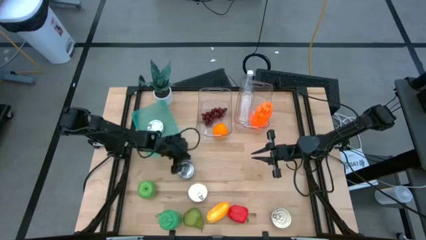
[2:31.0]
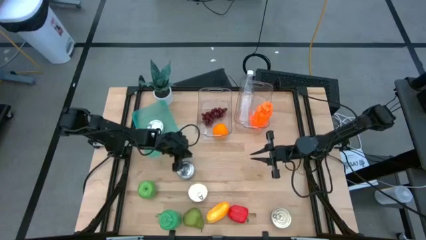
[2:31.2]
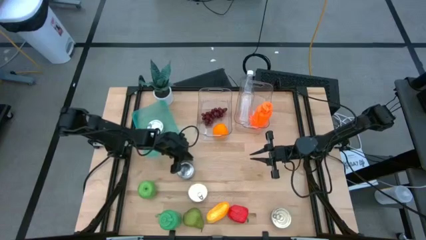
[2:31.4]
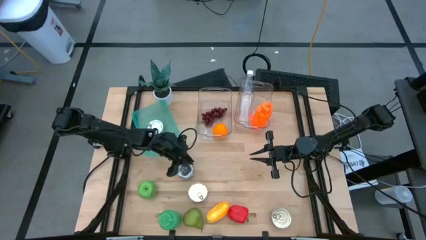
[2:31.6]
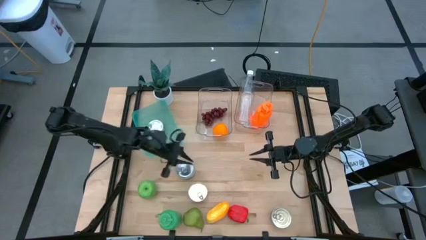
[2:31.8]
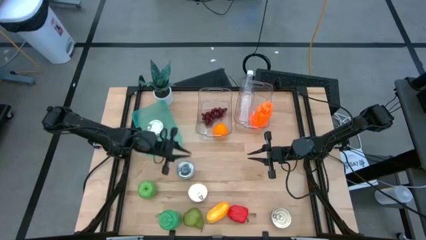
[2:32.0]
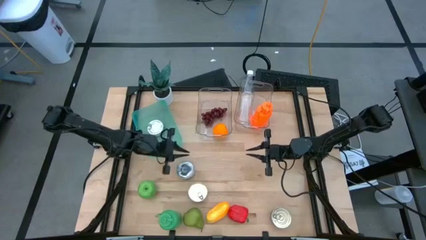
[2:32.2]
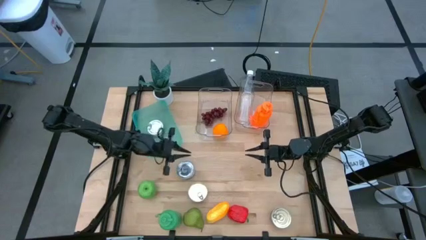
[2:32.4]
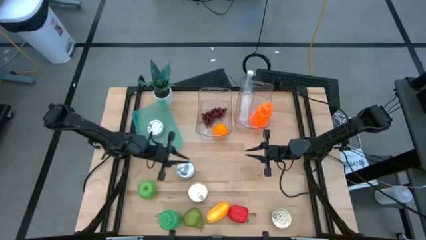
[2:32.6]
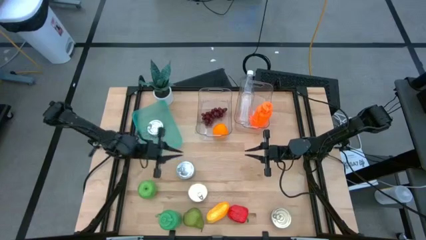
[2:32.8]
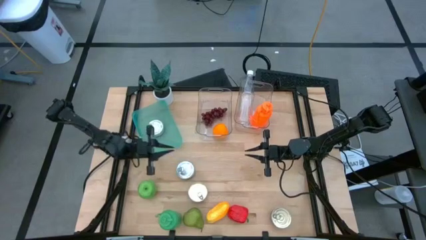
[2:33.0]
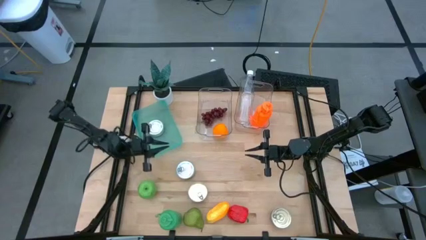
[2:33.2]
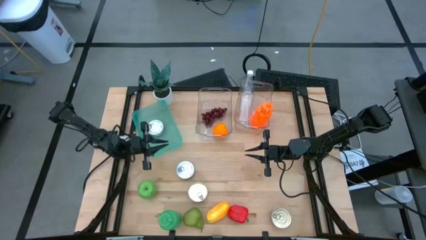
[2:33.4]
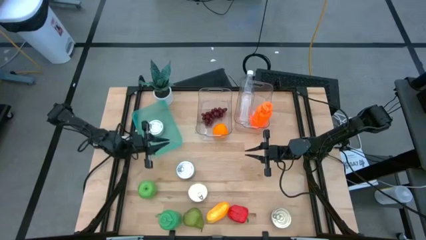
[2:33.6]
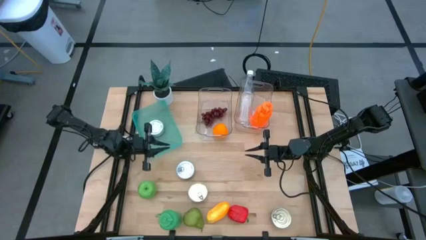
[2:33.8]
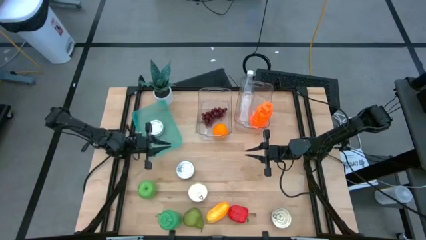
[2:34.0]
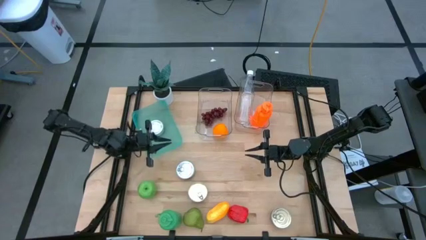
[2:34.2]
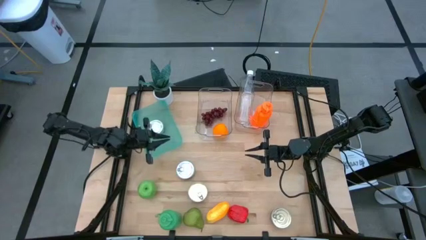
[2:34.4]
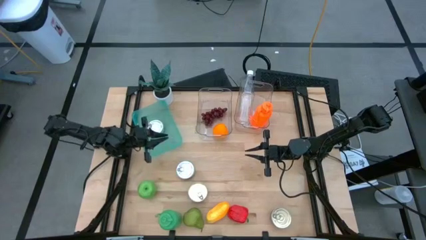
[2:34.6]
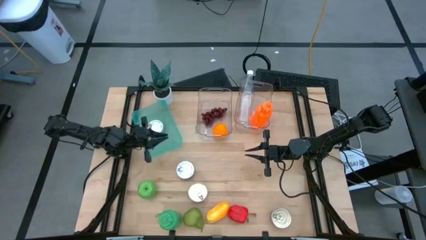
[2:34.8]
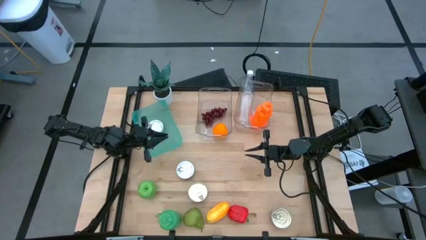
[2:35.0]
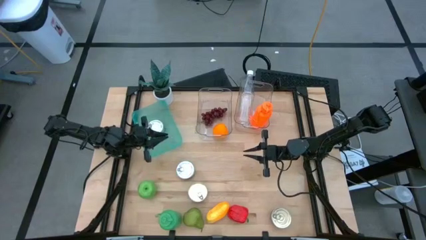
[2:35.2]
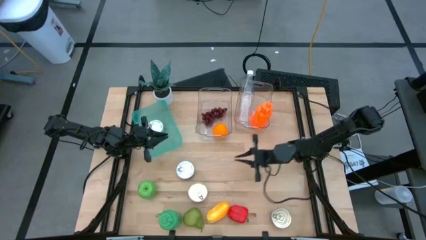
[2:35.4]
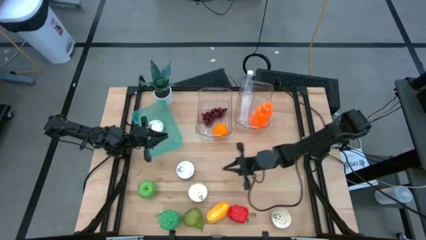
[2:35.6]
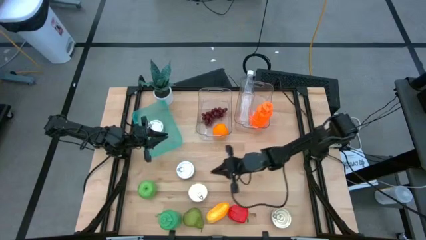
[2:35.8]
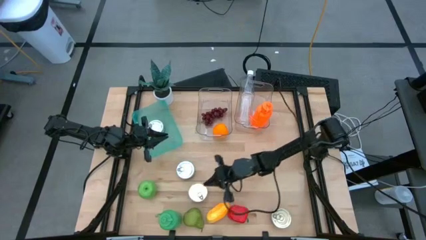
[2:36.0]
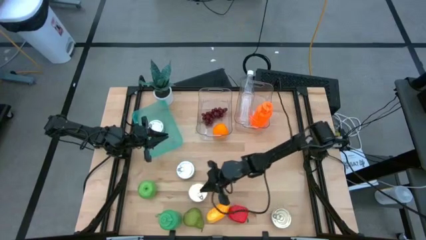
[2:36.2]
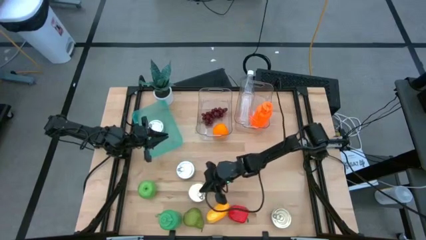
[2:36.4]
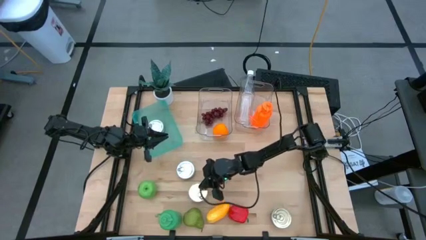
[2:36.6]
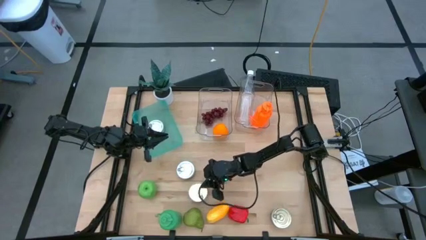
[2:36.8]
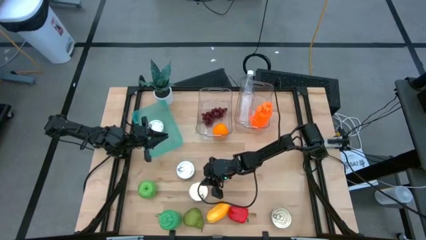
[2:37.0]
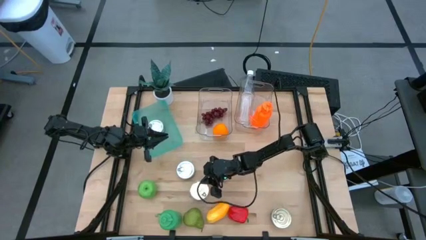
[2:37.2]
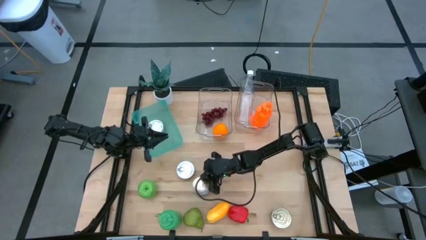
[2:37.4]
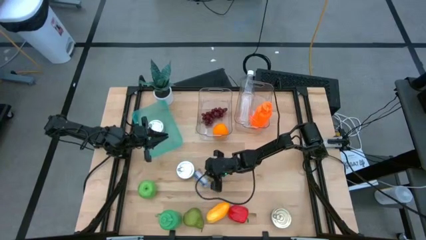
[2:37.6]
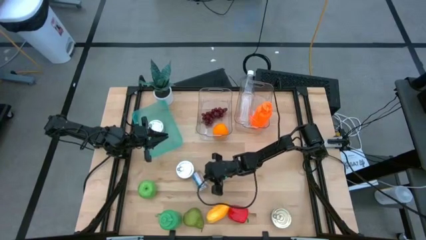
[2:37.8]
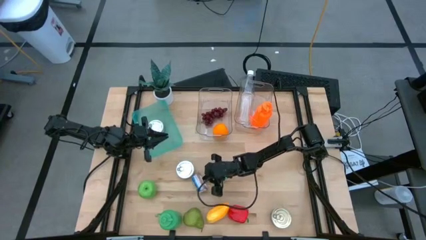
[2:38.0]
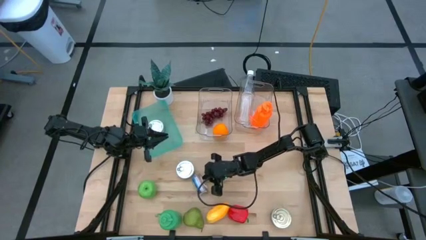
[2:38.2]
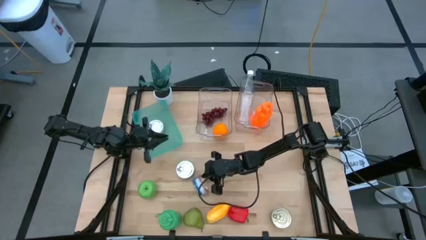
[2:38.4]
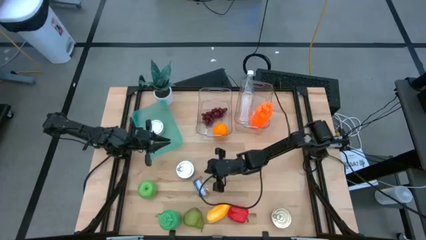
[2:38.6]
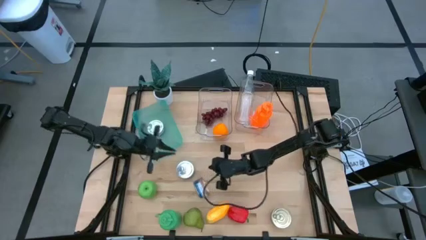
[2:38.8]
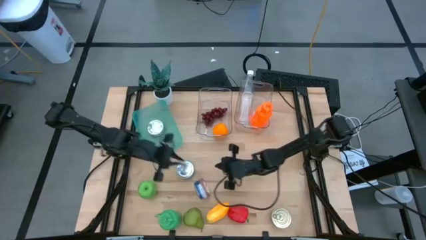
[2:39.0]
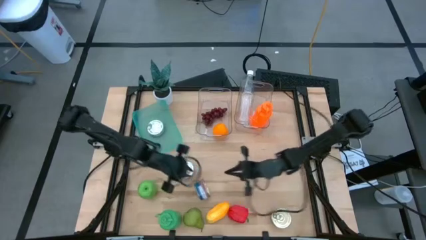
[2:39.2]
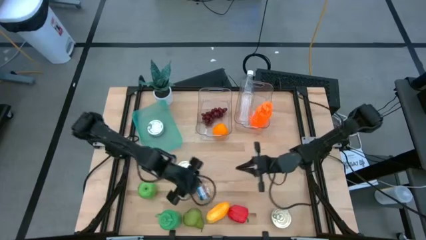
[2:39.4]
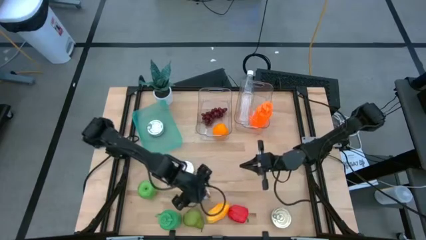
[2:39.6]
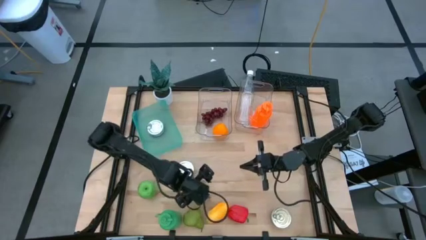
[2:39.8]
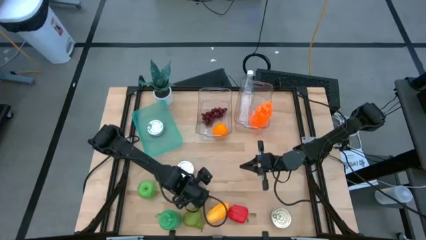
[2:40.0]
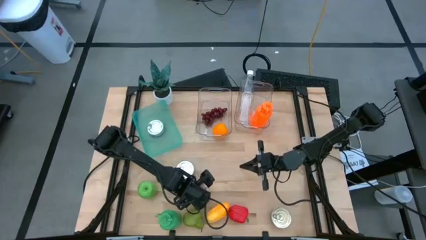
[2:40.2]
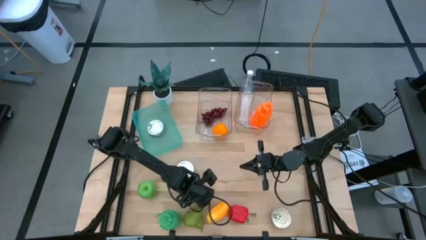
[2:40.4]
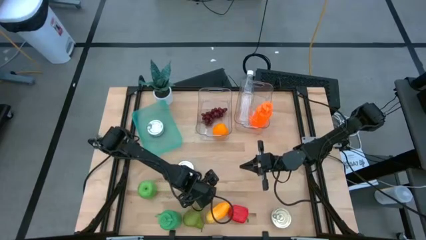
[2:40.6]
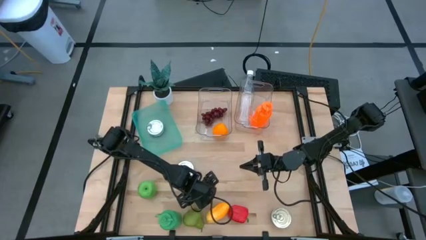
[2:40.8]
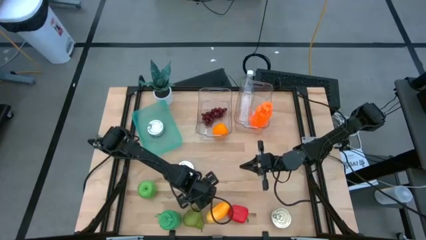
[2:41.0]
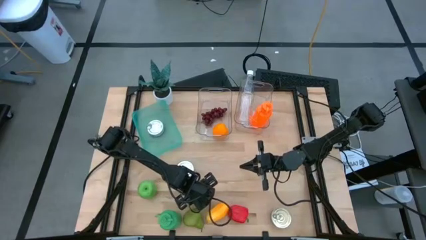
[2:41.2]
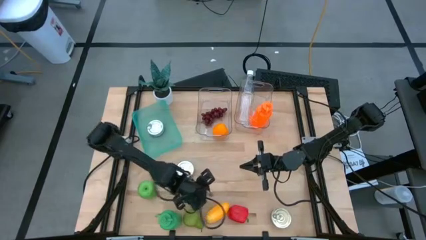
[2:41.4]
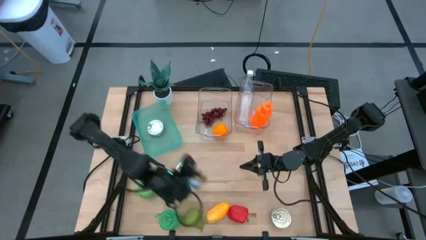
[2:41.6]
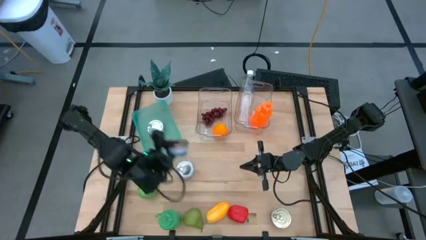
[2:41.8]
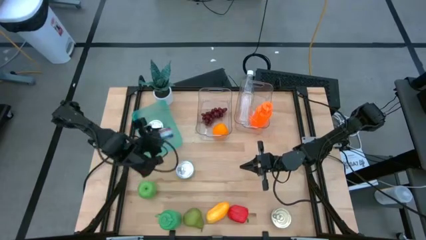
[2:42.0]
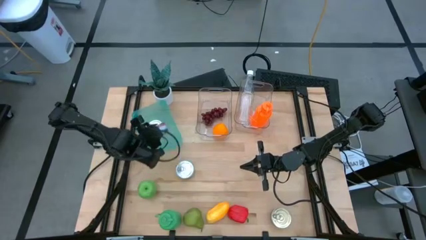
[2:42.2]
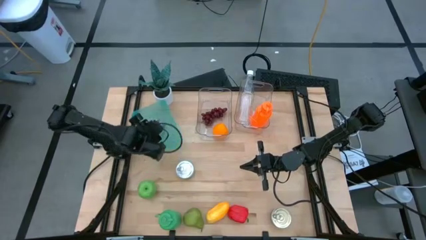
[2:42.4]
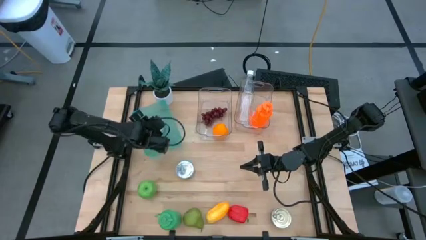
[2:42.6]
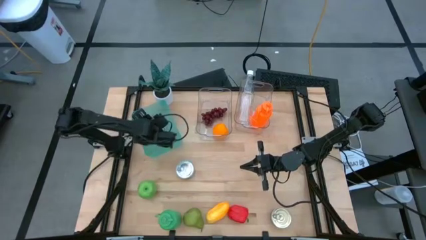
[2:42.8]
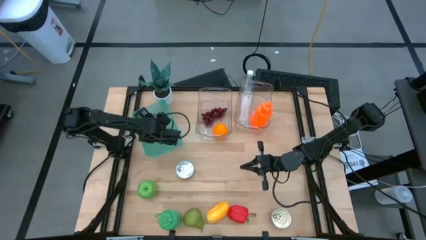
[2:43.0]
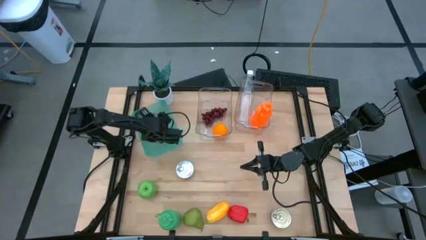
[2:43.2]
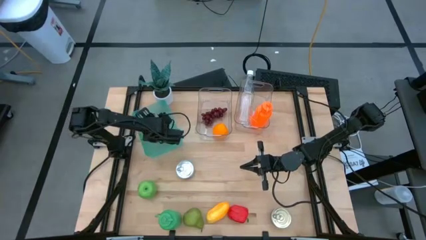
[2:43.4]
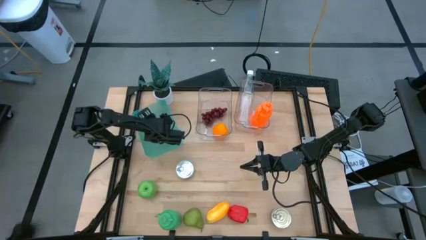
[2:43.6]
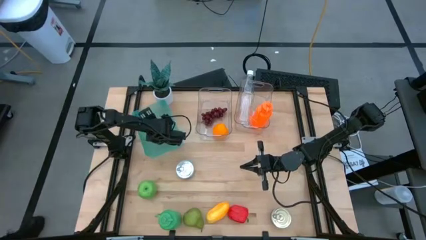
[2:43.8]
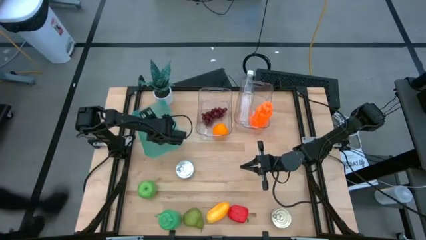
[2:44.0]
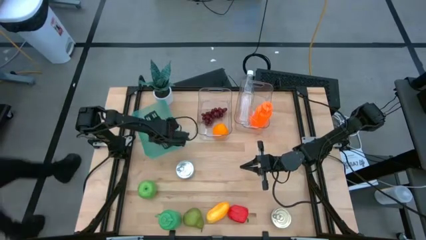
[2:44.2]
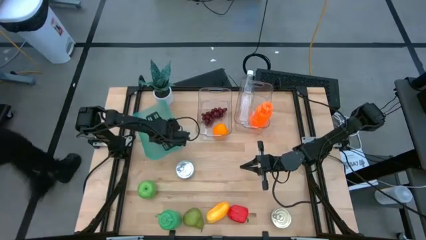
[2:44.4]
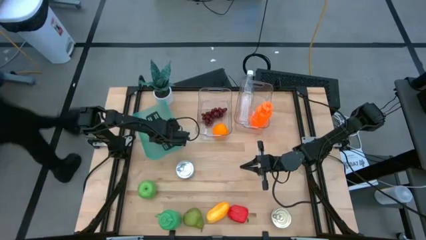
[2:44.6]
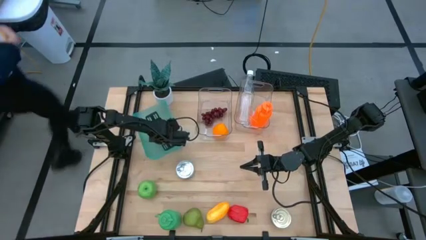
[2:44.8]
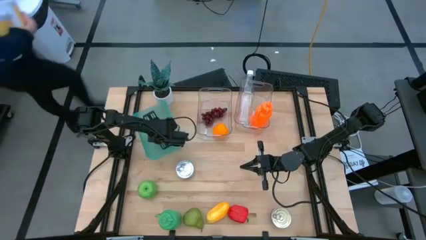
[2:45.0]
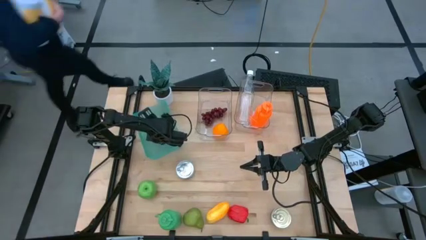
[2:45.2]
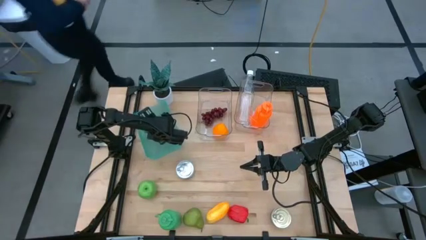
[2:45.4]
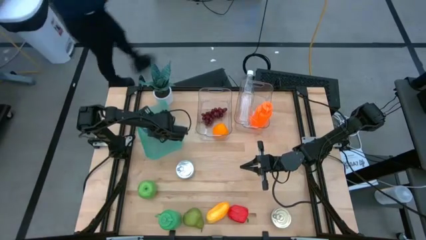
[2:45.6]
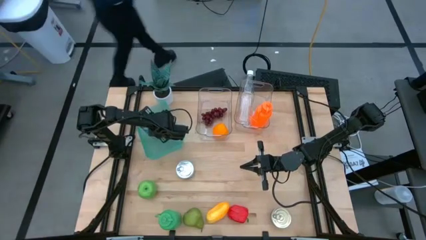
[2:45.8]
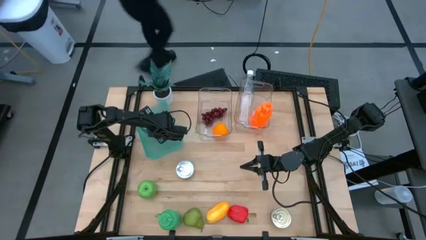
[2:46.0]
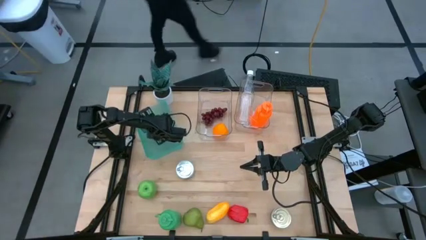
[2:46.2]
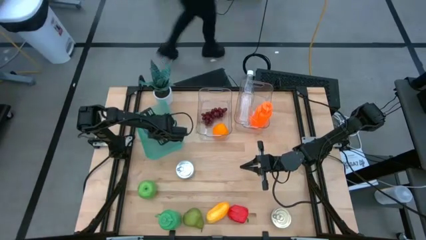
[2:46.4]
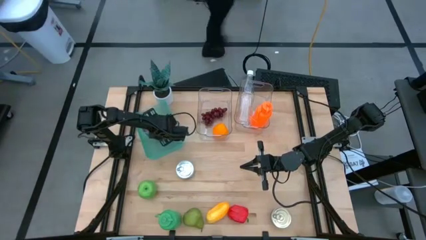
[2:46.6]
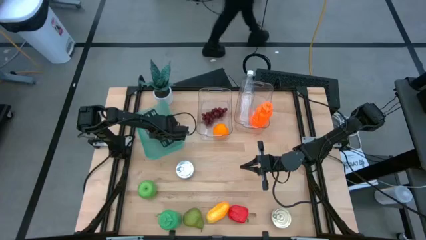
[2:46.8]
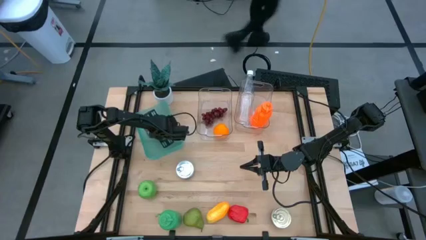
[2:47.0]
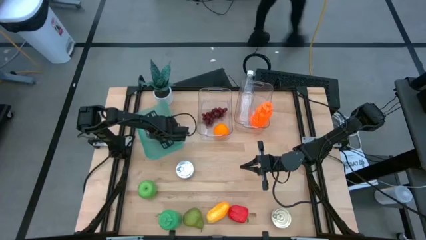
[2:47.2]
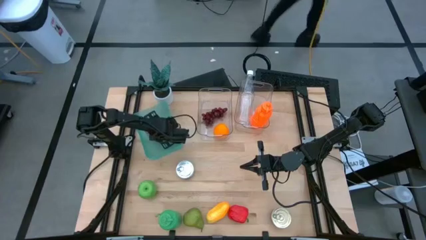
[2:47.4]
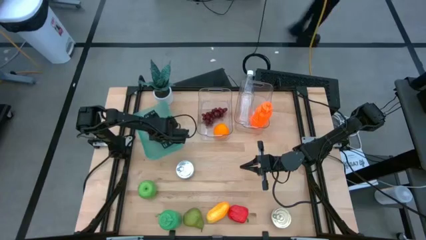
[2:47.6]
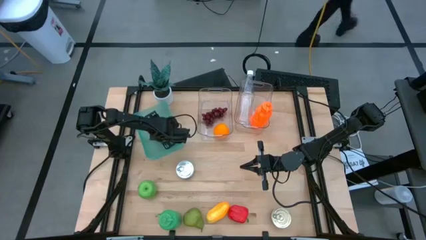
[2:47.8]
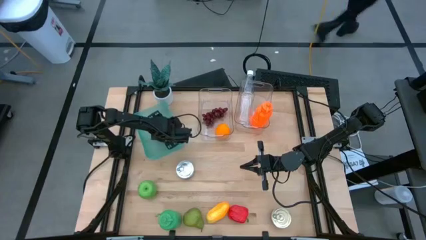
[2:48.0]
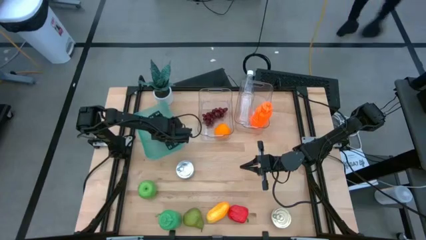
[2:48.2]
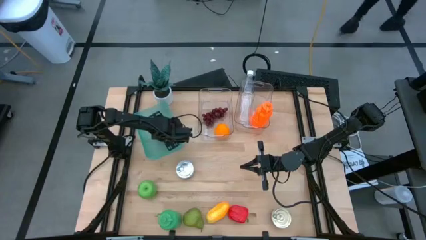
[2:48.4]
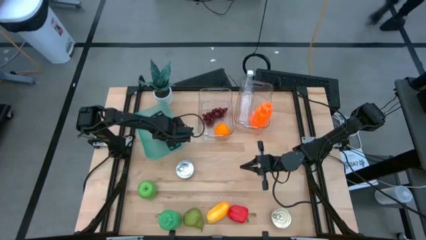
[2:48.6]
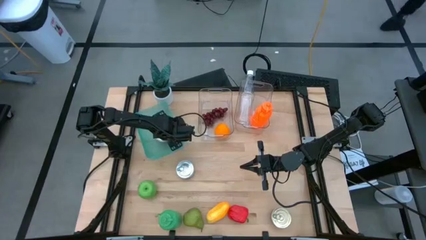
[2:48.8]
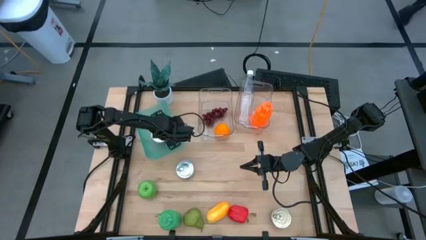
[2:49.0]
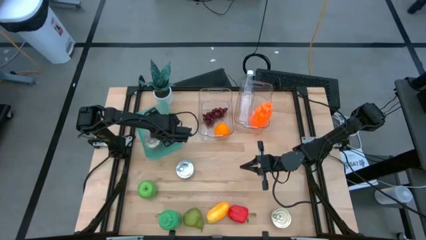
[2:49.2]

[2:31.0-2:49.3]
Task: Pick & Place Food Item
Put the left blue and pink tuna can into the blue bin
